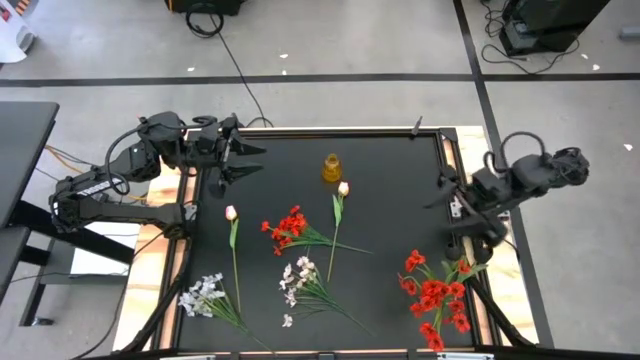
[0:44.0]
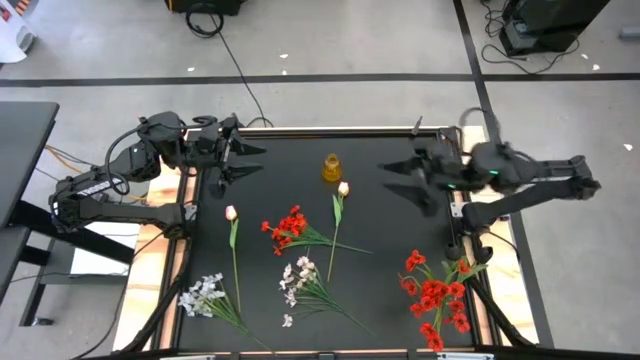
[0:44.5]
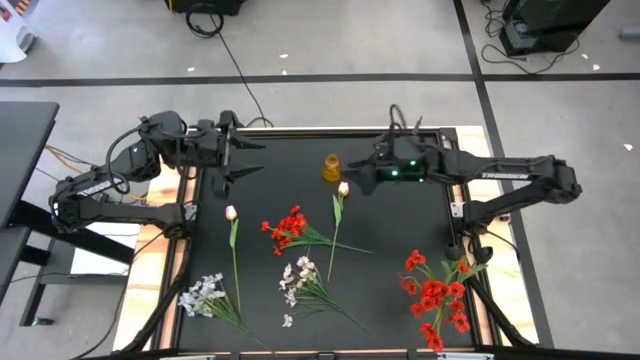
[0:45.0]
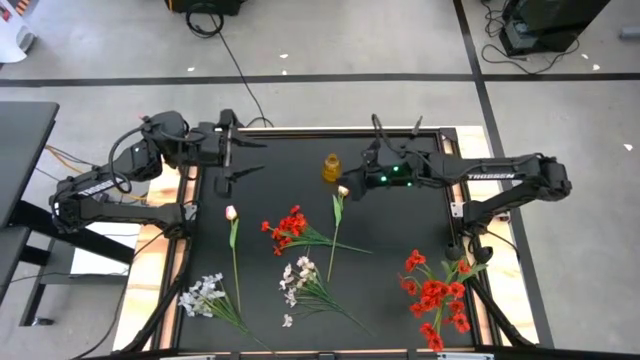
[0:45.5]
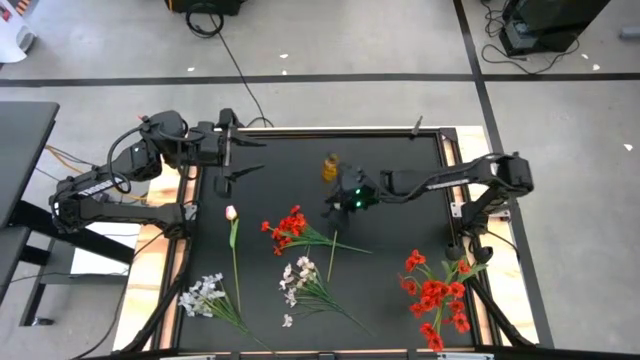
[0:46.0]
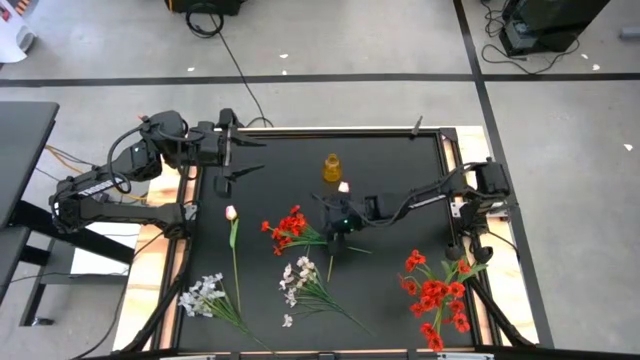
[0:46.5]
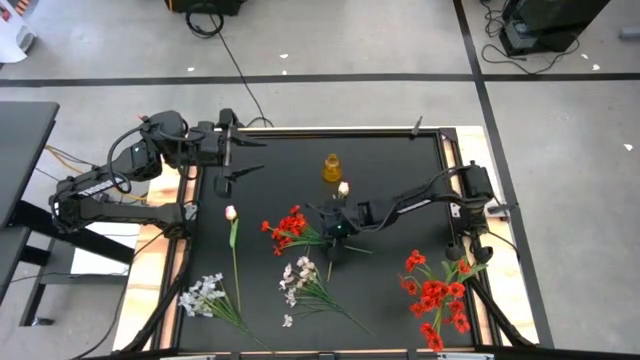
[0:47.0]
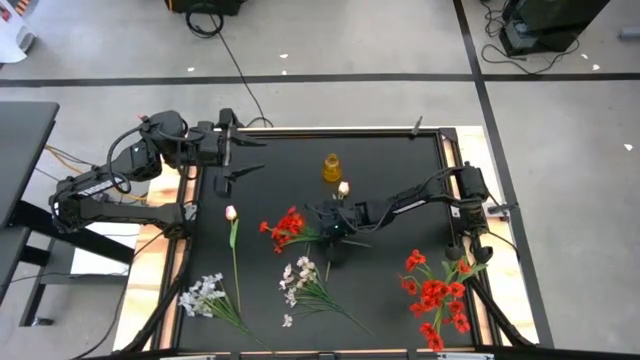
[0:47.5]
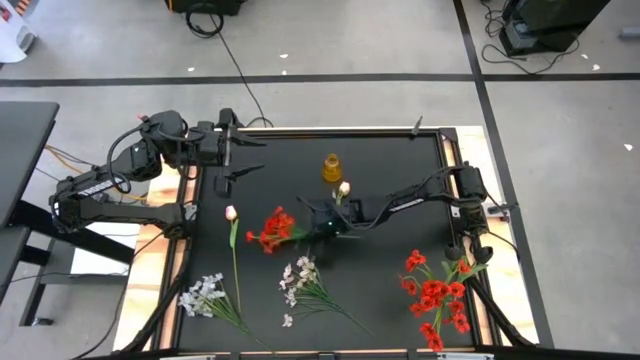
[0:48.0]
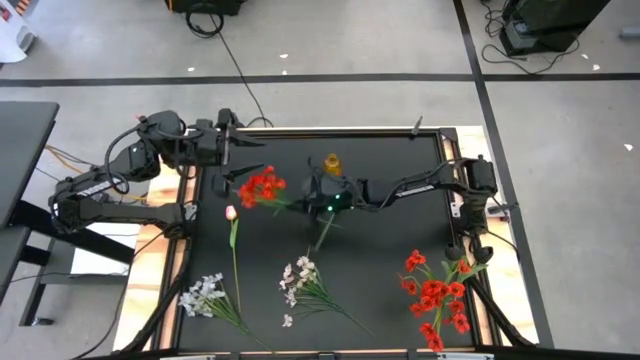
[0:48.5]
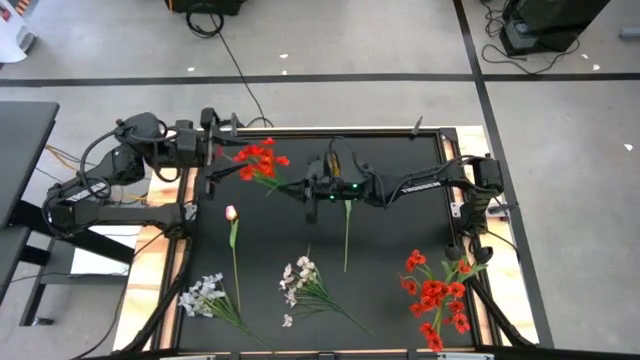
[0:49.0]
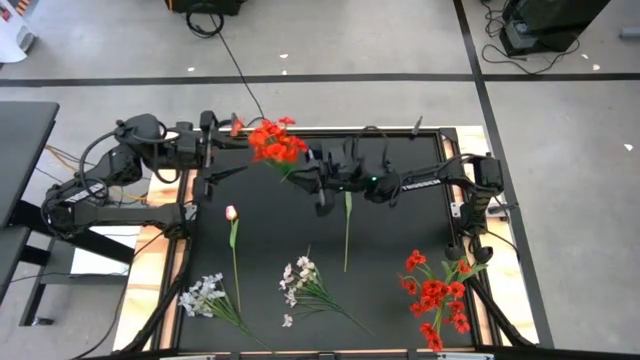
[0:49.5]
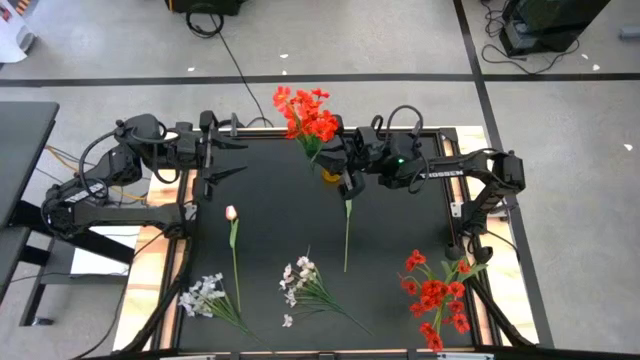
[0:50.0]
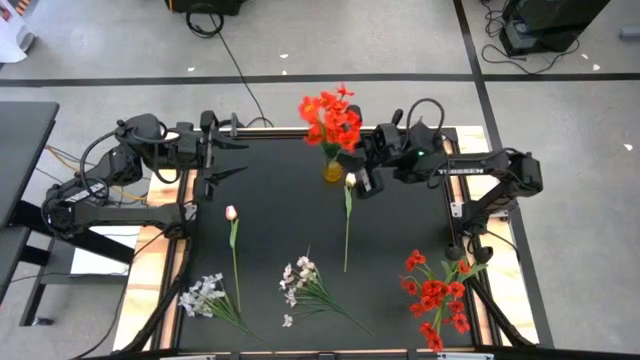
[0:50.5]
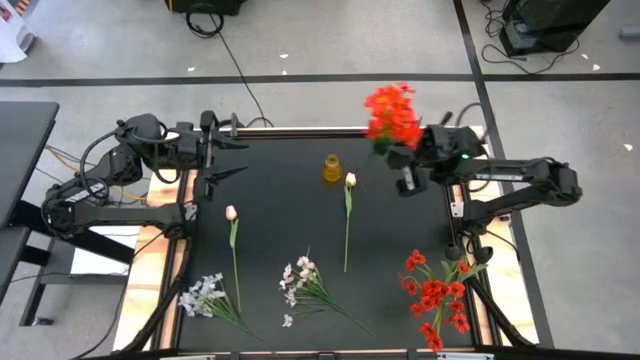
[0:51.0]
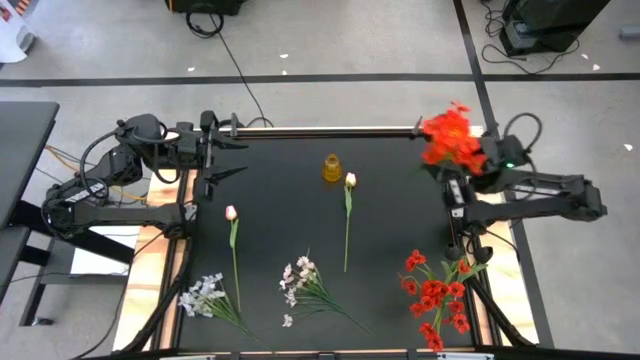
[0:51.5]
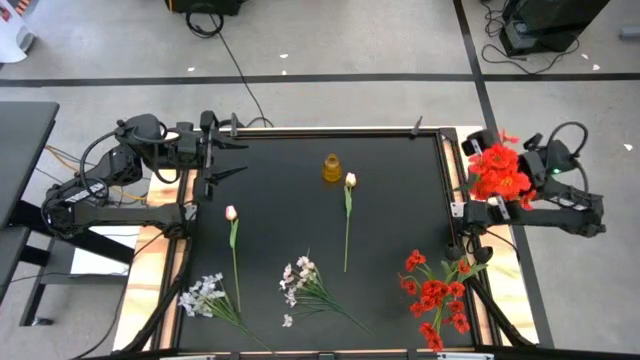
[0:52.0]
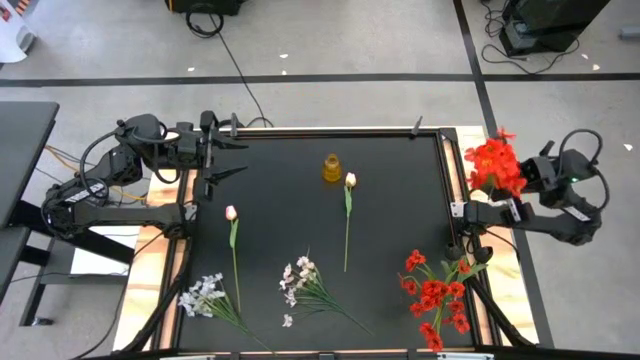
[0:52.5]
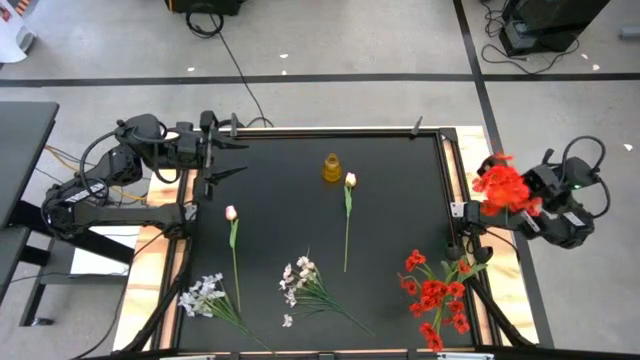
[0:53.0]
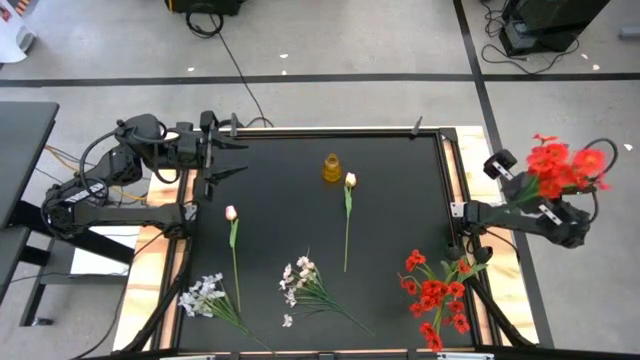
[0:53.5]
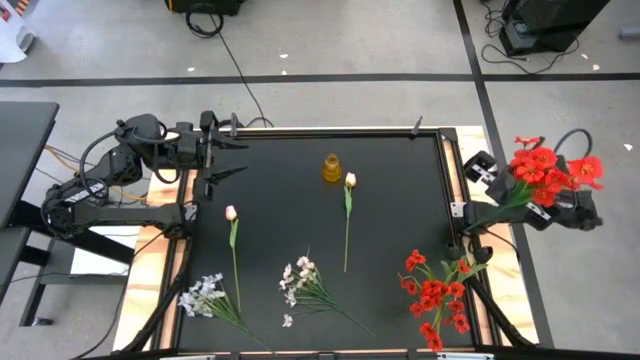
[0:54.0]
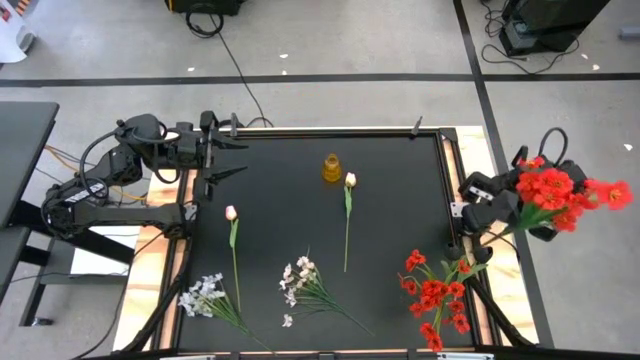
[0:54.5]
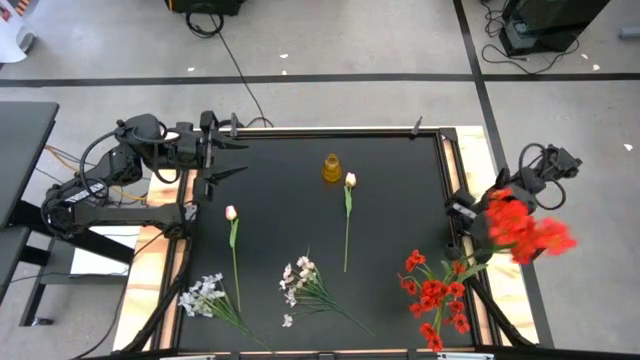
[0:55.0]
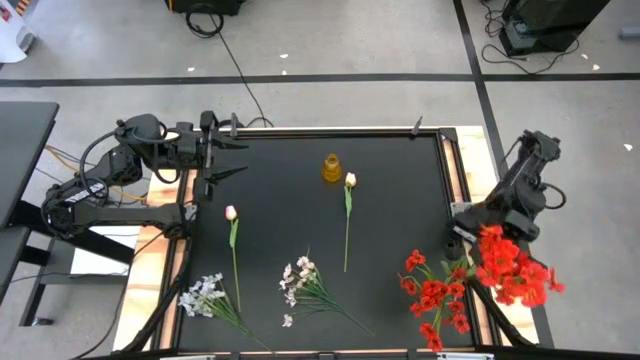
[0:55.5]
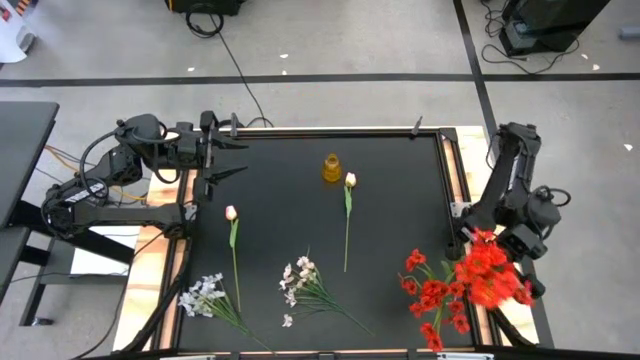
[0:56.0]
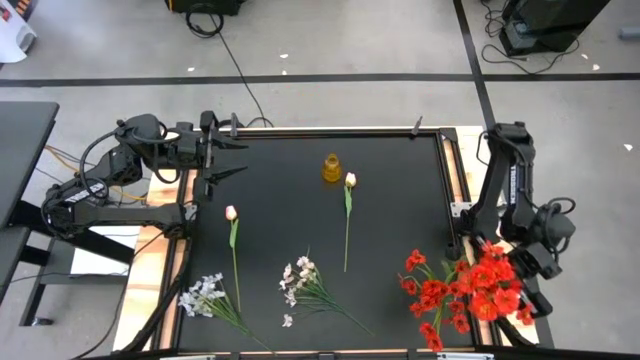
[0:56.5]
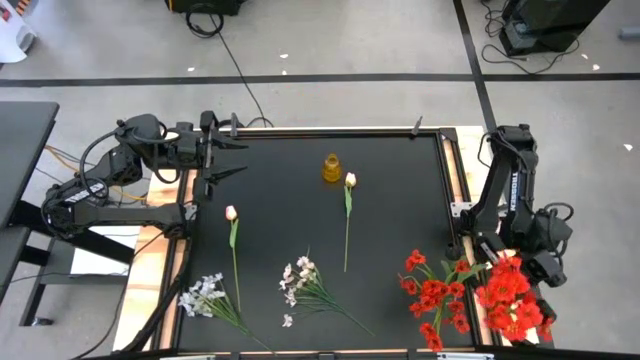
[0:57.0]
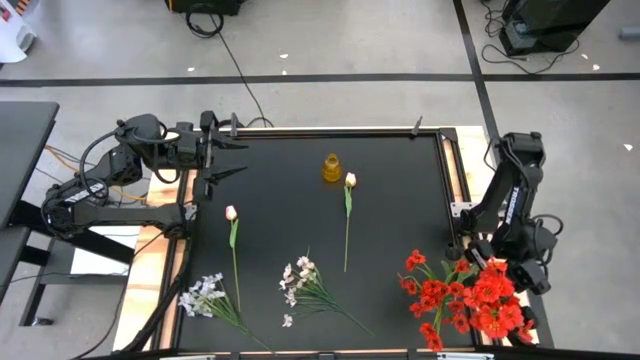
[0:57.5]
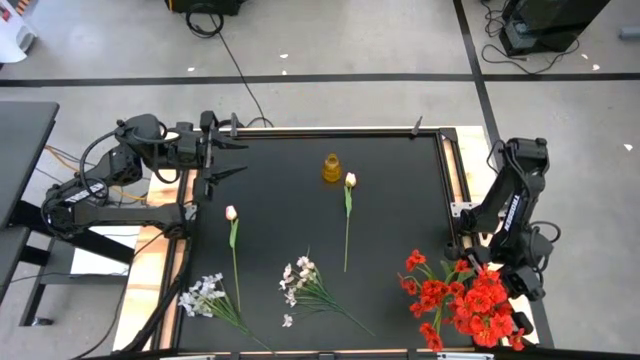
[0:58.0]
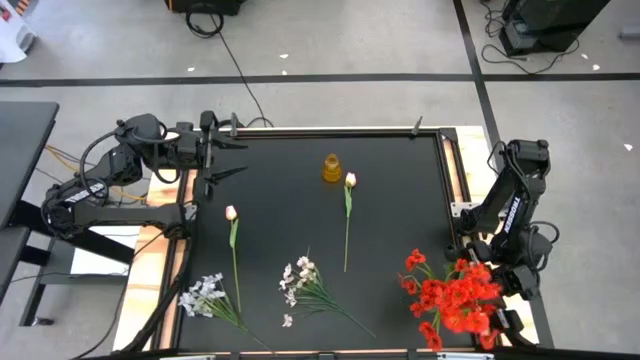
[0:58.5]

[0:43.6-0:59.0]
Task: Sort flowers into vase by color
Put the red flowers into the transparent vase

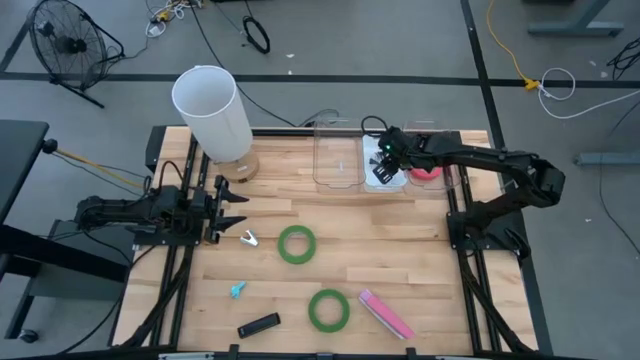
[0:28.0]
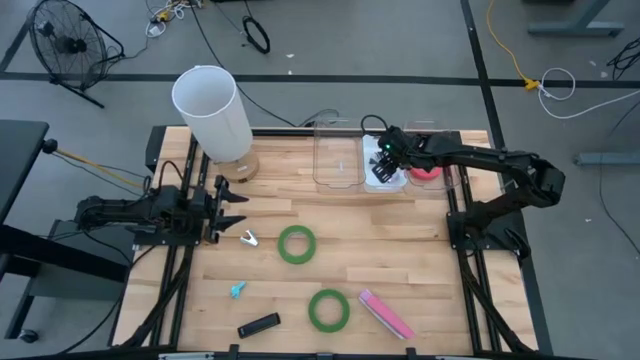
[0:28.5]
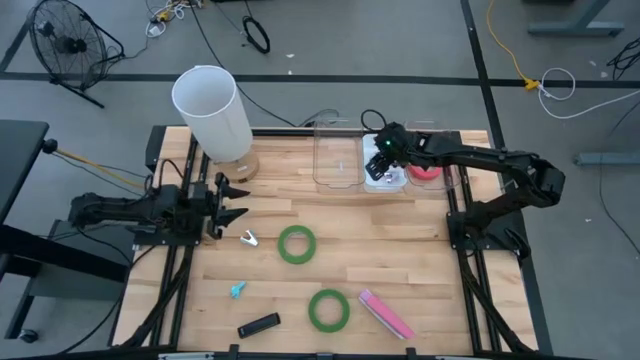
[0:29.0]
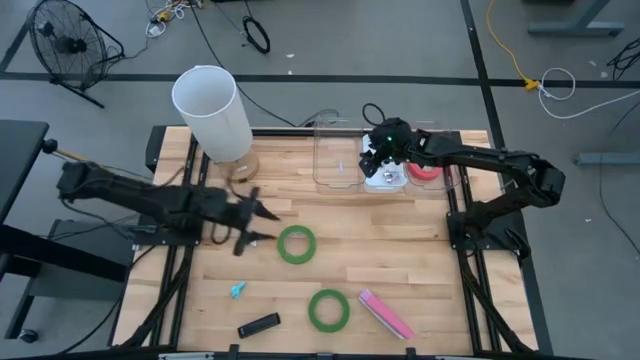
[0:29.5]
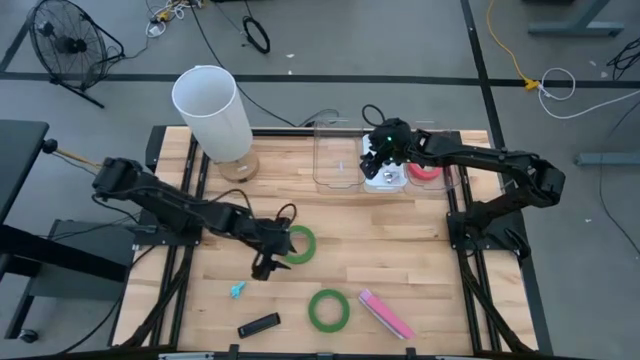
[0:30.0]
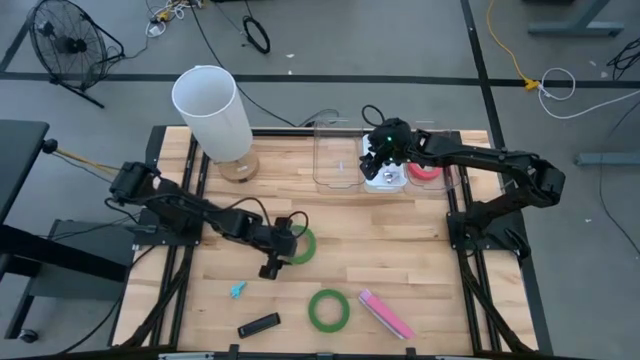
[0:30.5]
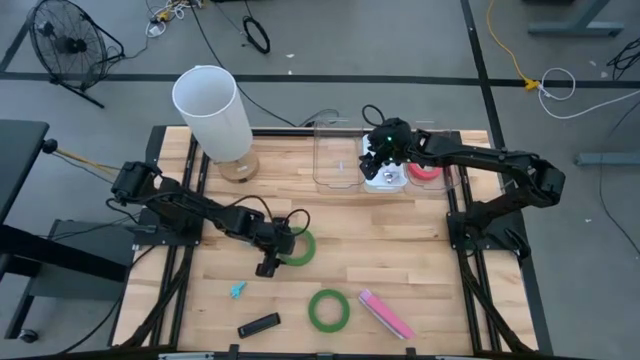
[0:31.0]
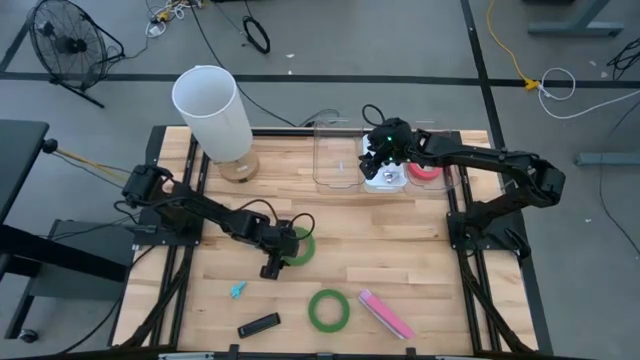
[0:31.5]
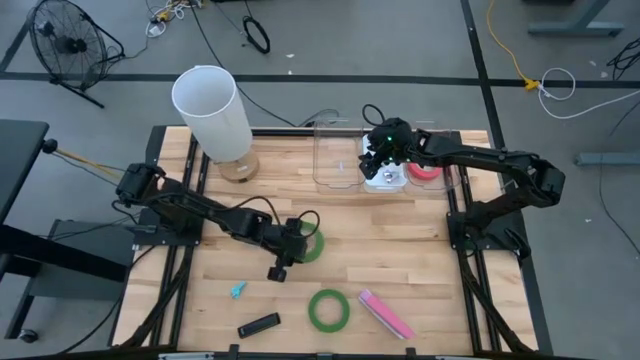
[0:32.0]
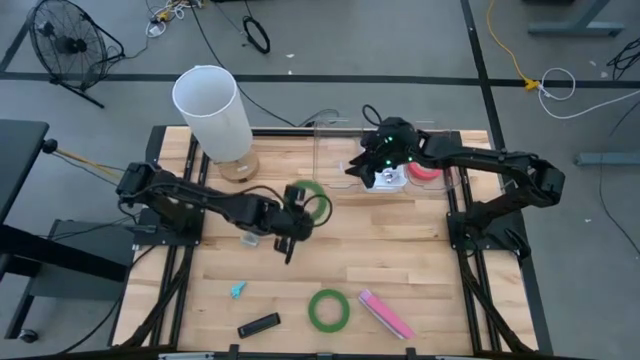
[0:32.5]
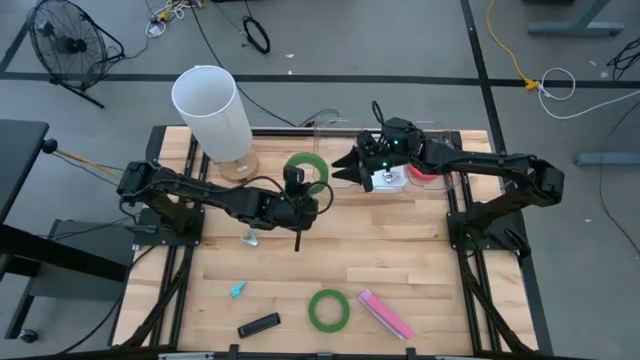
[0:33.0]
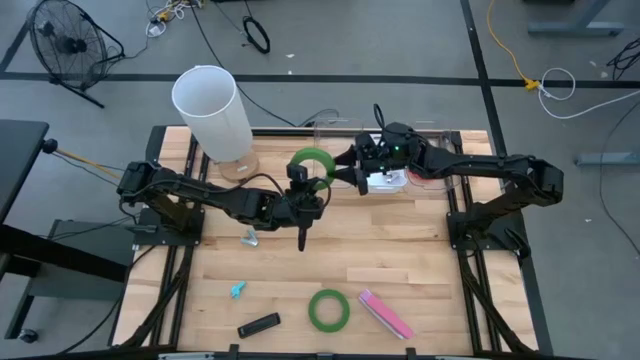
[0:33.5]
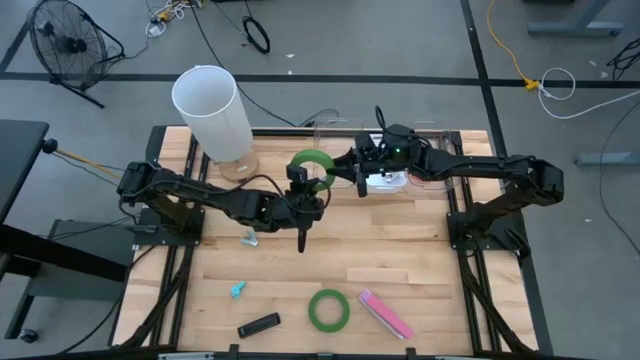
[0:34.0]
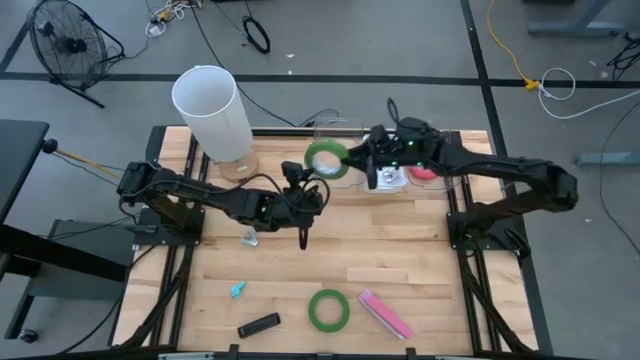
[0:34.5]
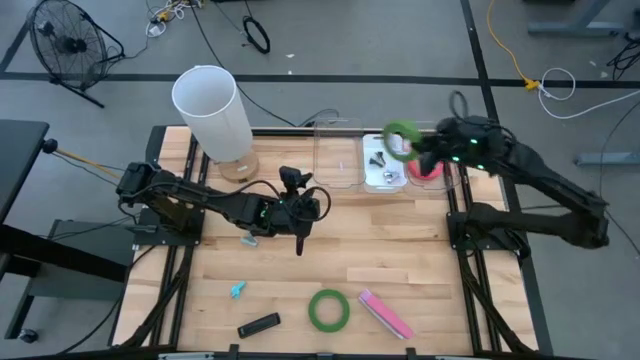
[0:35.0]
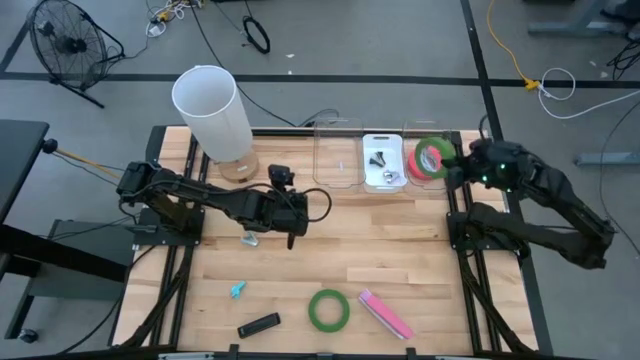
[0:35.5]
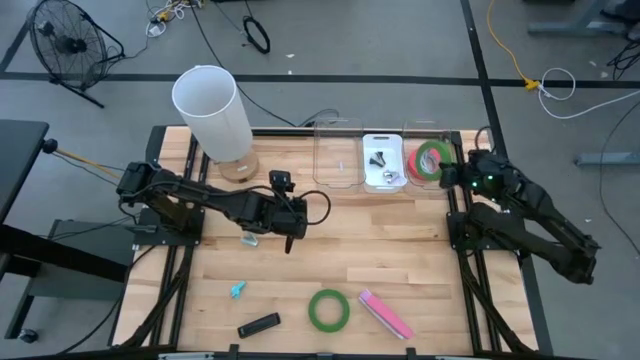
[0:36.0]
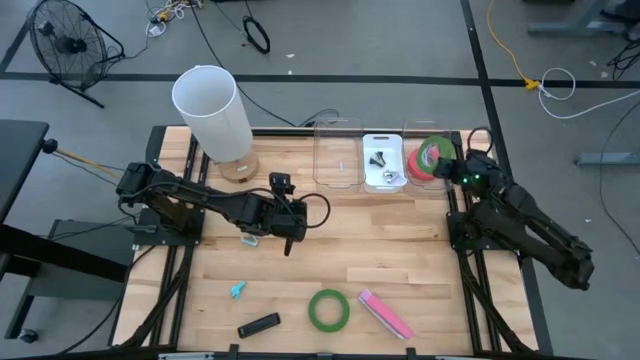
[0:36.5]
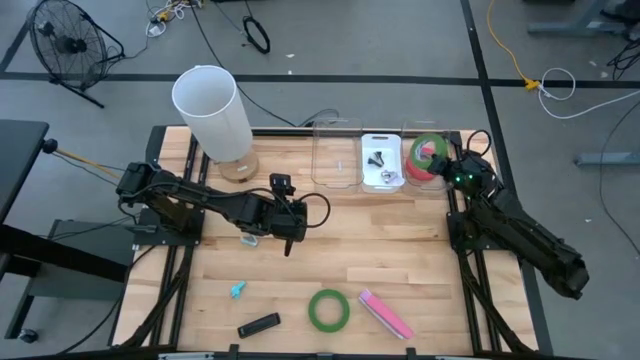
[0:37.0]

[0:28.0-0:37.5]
Task: Pick and place Stapler, Stapler remover, tape
Put the top green tape into the right transparent bin
